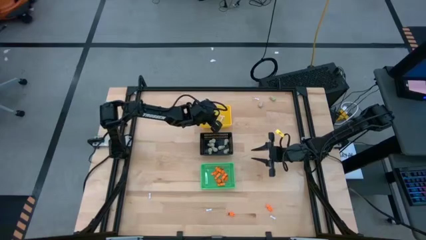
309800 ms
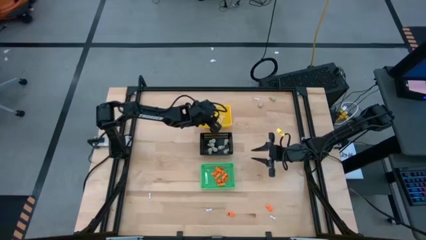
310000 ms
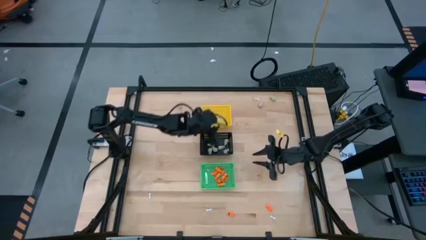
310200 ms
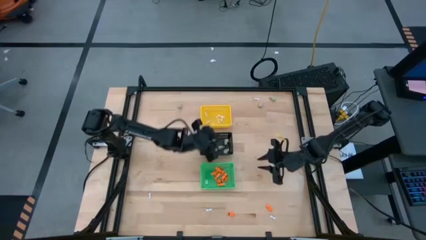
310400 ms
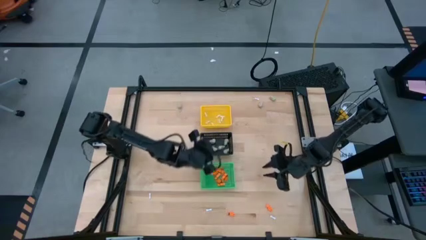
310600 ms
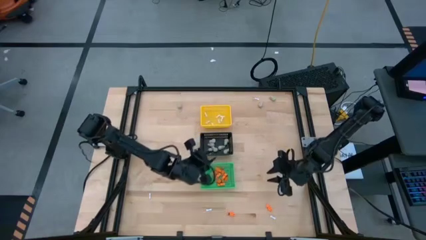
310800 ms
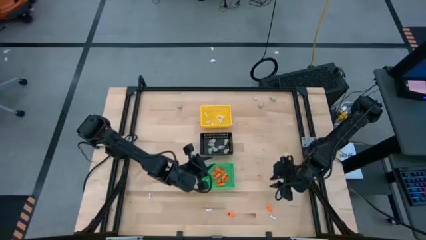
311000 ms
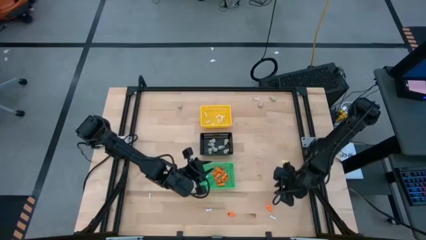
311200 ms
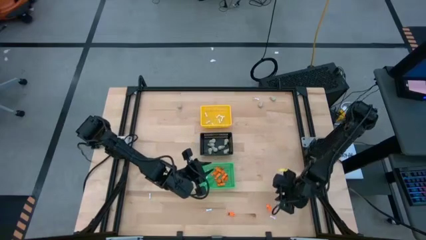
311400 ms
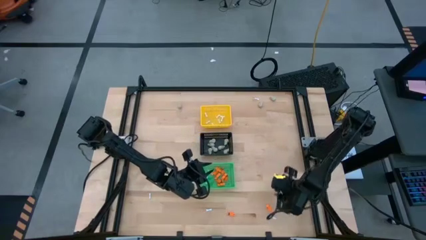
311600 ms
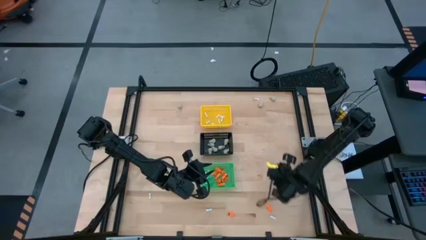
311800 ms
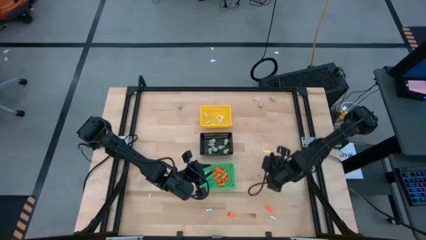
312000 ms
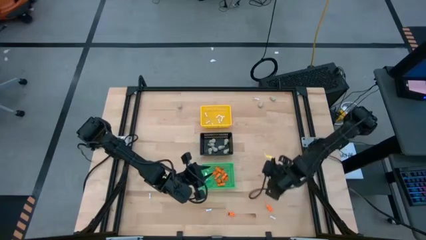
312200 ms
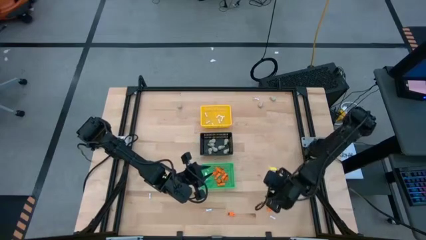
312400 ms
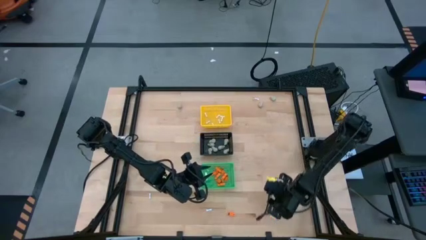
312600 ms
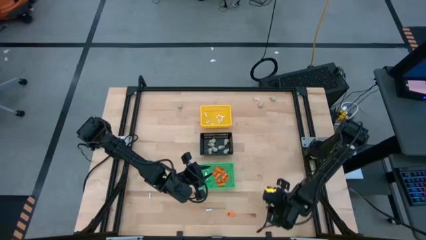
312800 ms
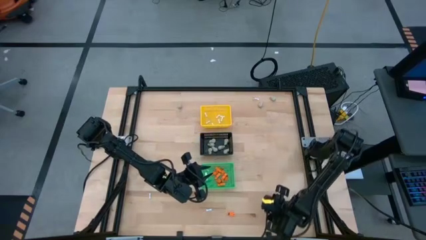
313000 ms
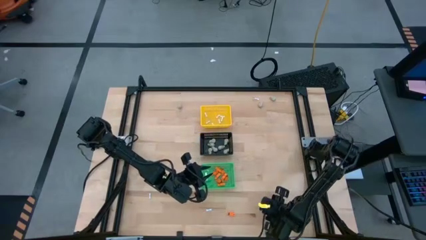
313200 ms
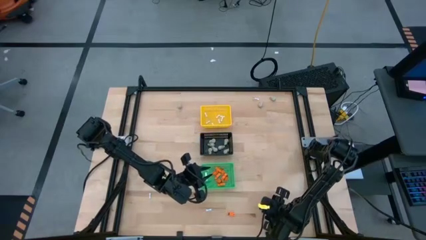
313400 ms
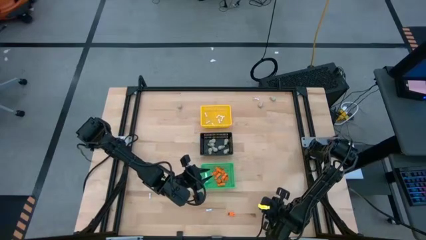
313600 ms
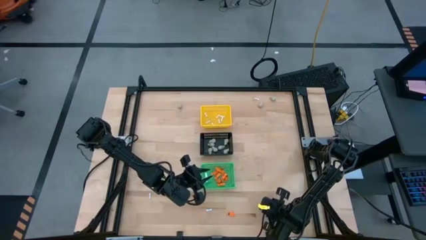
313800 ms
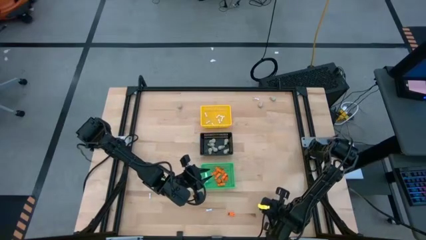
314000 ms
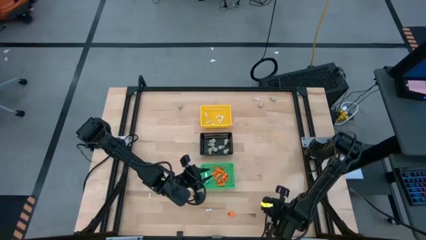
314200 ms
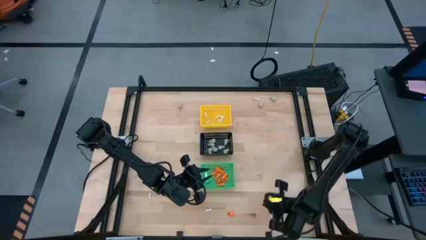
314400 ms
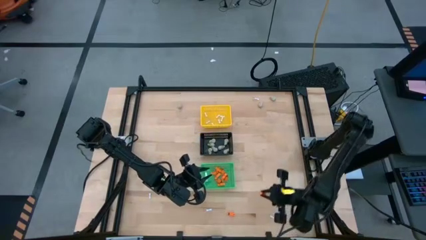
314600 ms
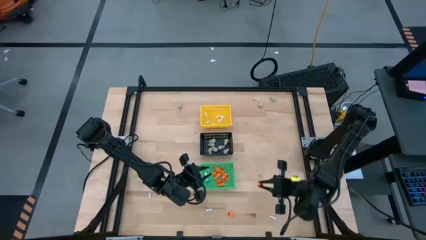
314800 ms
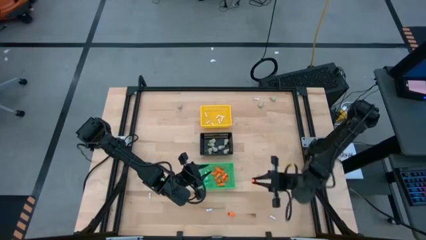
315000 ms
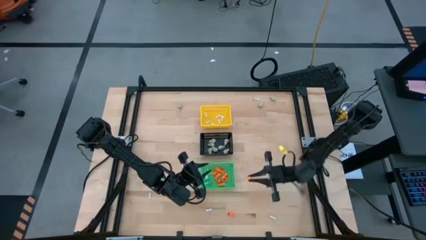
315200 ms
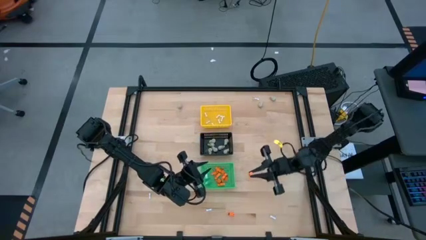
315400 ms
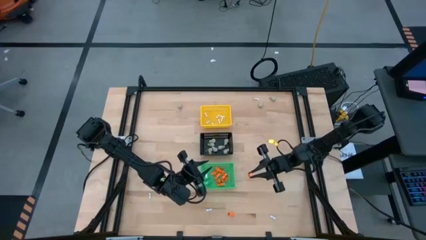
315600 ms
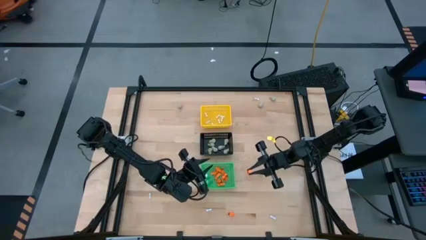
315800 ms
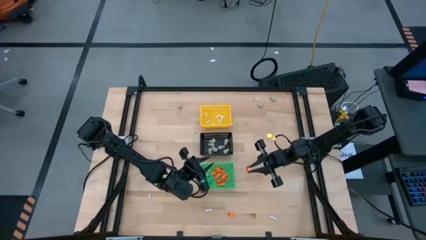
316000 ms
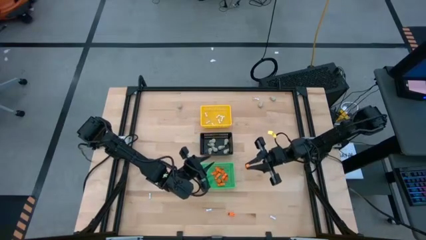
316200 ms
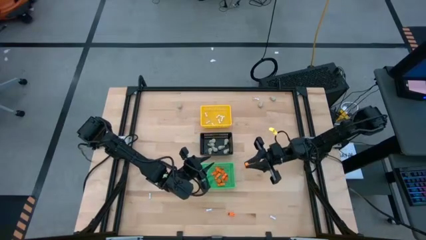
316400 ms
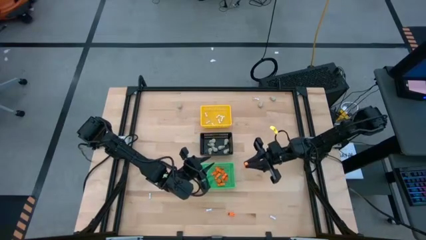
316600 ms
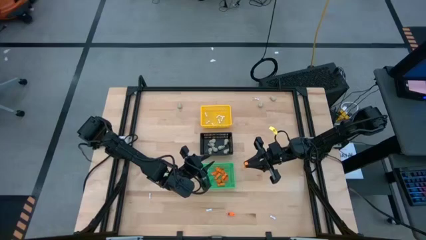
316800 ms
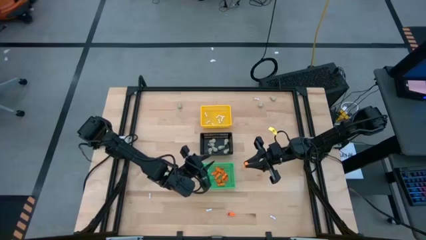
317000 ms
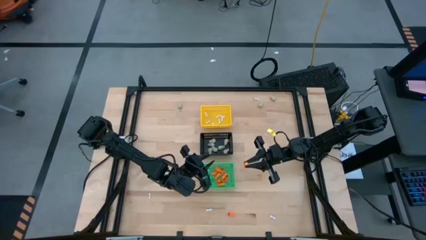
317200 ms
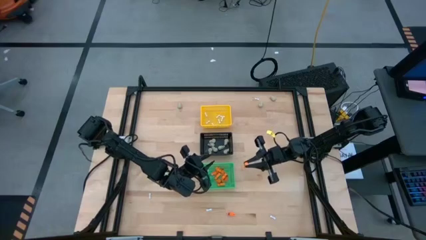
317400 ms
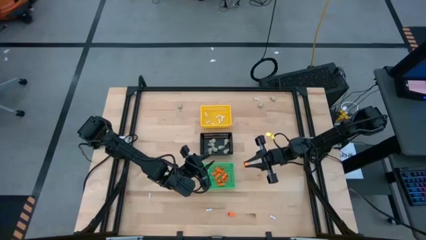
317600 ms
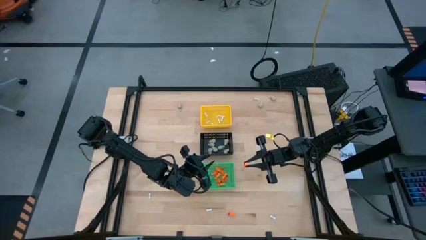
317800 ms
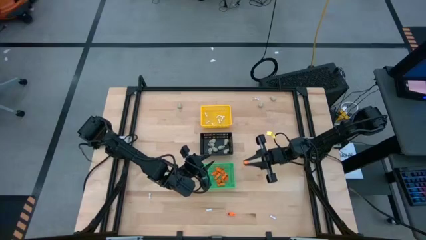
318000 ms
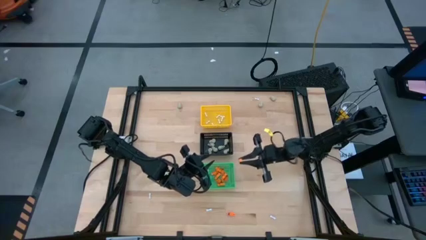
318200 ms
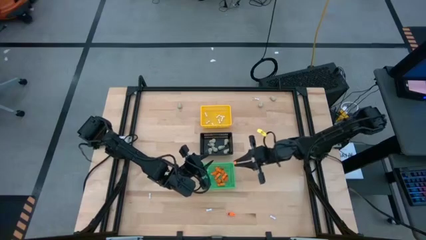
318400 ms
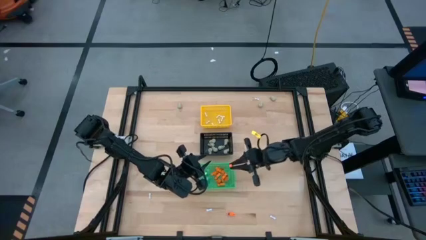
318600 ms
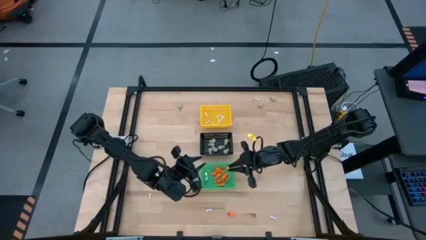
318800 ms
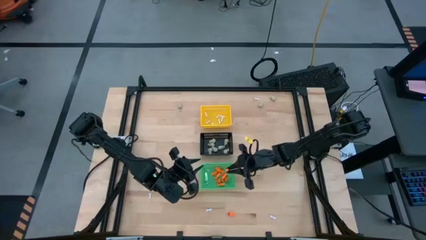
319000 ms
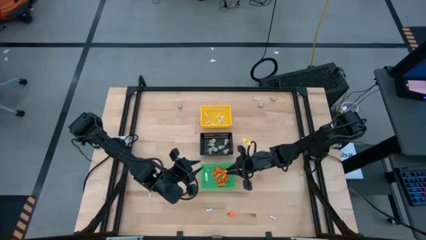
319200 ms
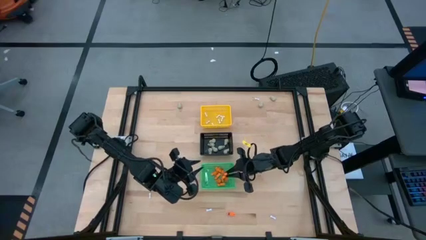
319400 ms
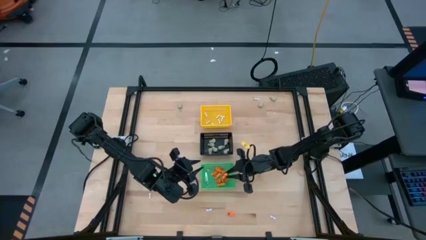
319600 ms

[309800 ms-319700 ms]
Task: Sort Halloween decoration
Put the orange skeleton toy into the green basket

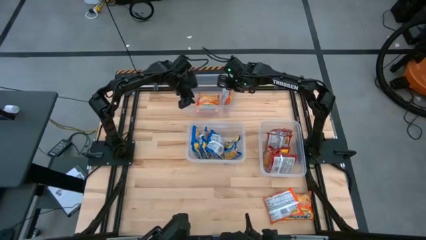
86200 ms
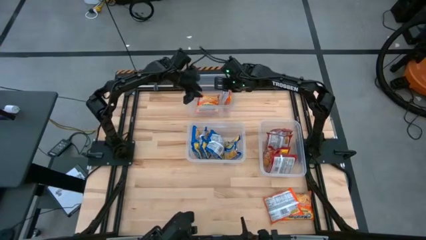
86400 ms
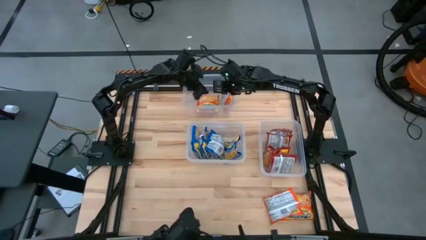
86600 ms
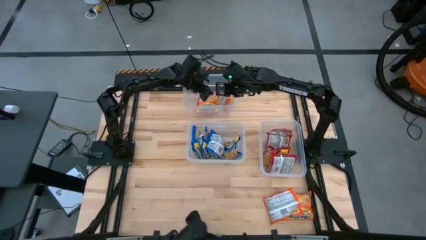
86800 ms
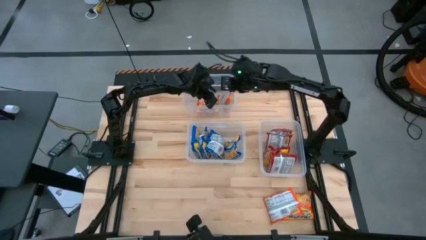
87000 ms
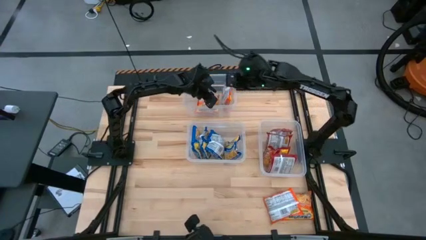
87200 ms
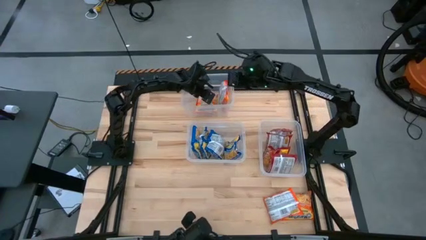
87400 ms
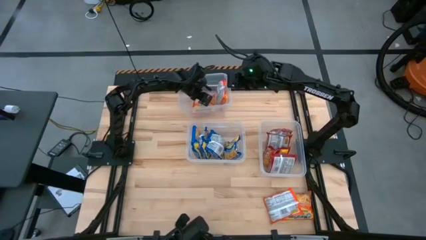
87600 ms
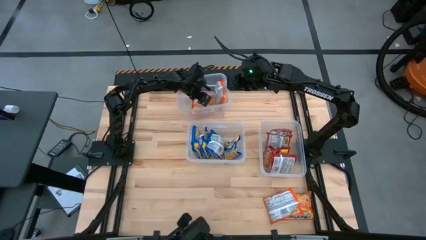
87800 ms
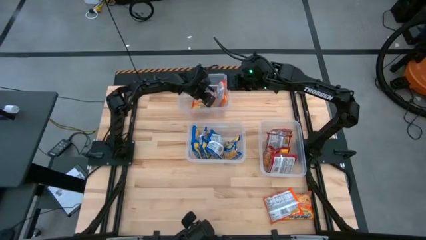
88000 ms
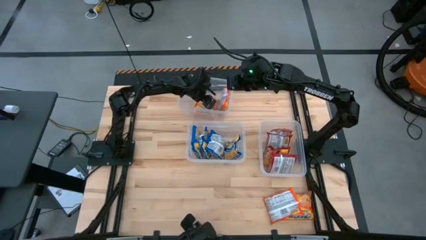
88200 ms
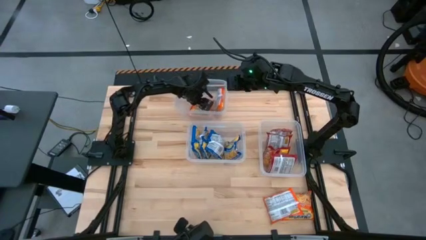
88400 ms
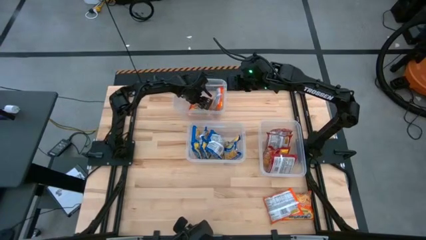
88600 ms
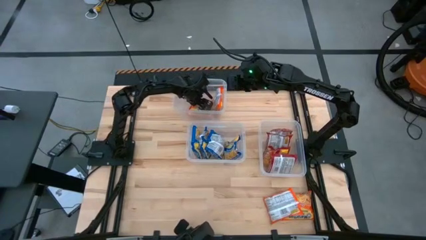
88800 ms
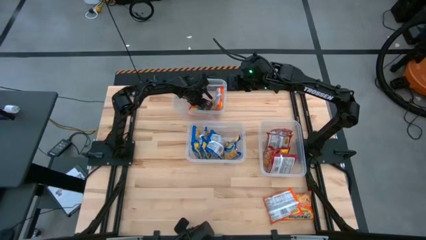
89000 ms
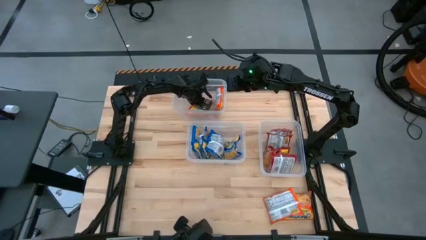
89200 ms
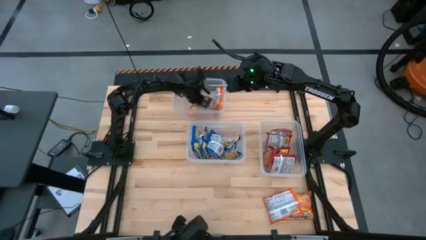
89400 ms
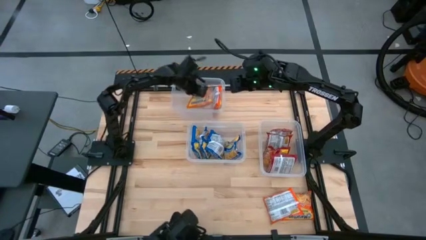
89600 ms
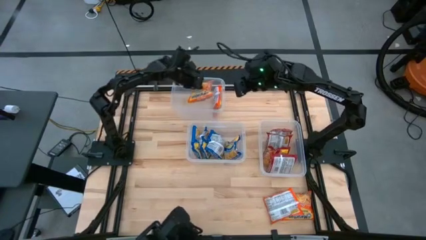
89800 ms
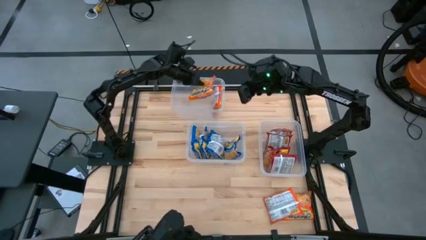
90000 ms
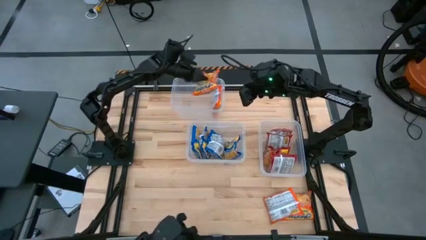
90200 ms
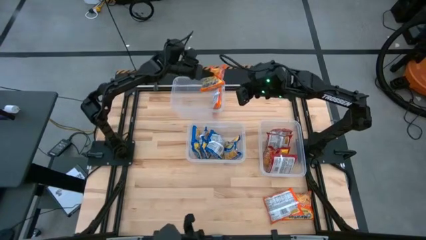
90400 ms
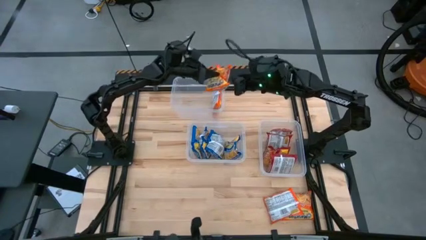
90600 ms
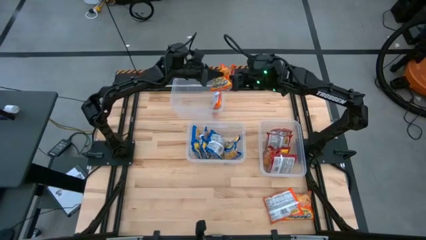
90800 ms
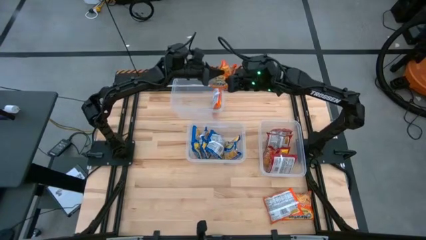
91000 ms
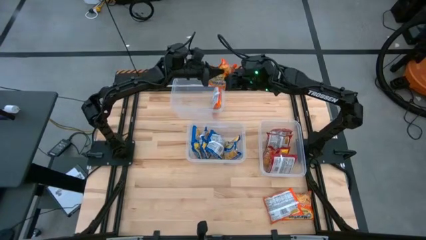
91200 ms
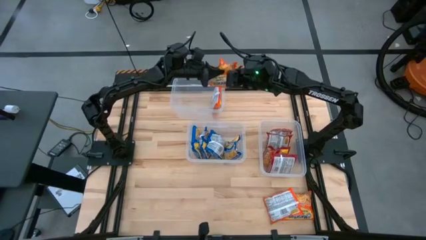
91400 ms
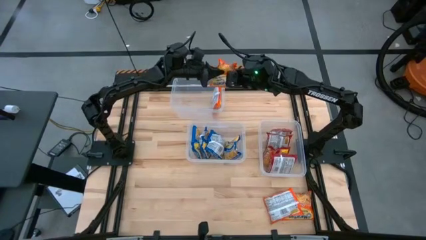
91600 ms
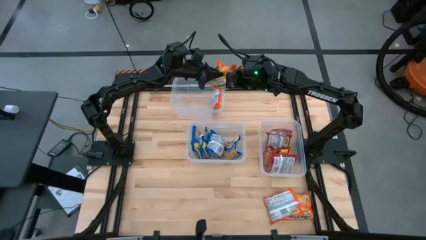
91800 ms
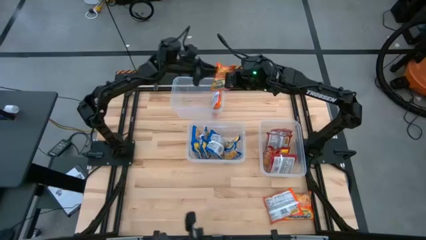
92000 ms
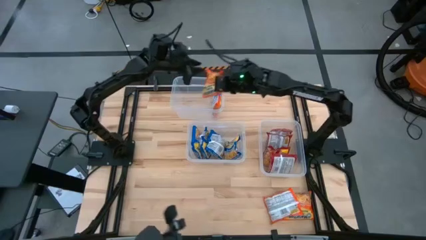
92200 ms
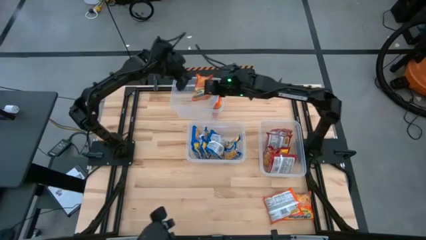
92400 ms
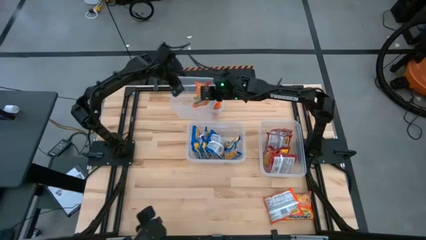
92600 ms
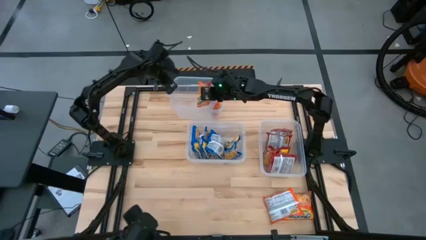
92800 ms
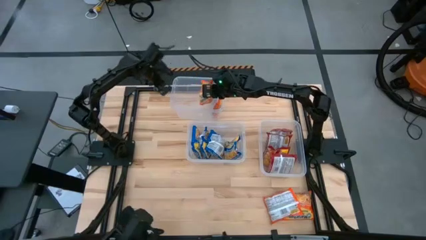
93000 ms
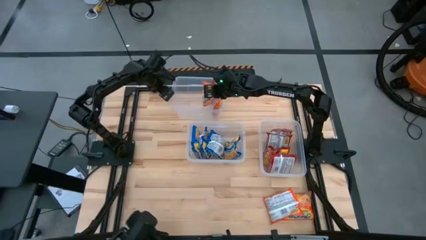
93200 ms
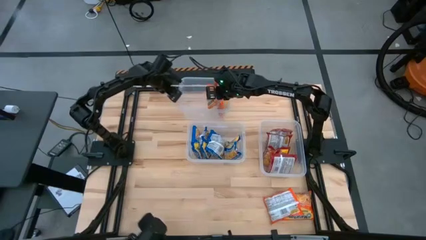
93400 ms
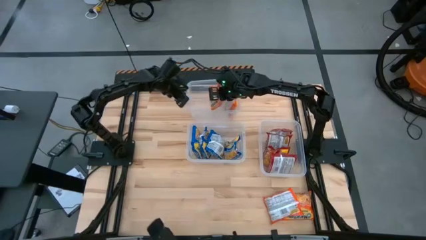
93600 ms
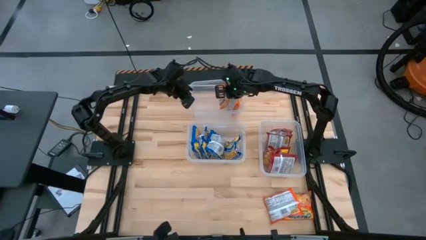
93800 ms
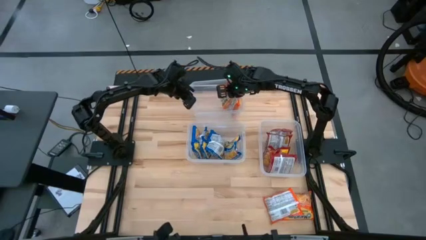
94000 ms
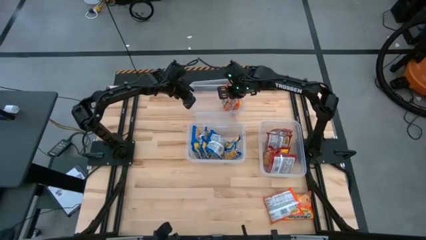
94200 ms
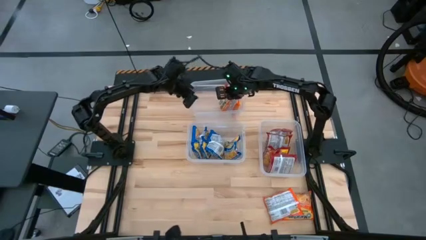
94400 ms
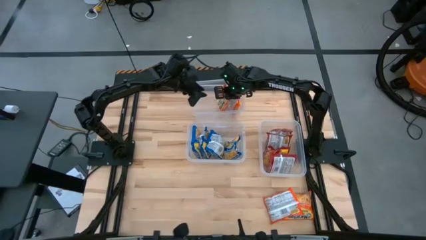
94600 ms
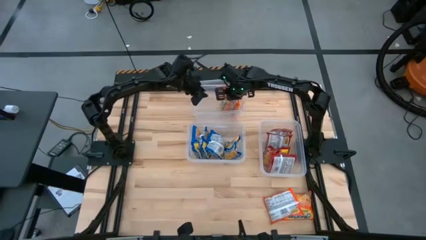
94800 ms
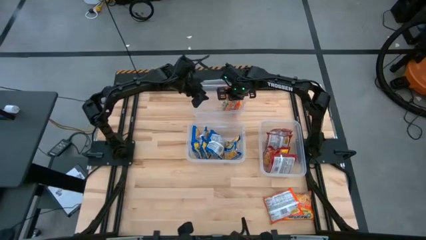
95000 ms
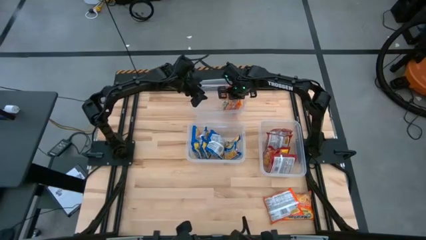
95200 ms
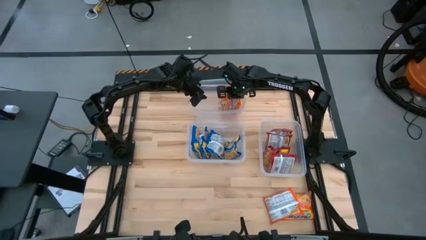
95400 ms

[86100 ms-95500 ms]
Task: Sort Maruchan noodles
Adjust the orange noodle pack in the top transparent bin
